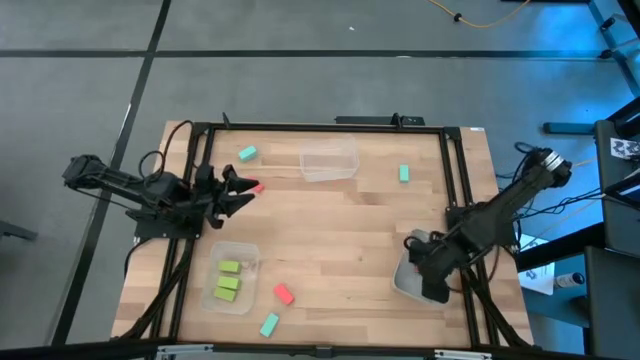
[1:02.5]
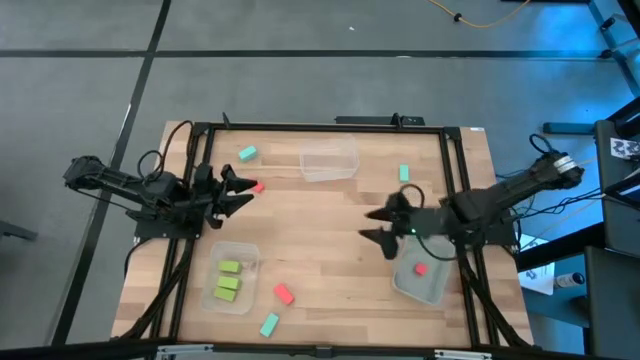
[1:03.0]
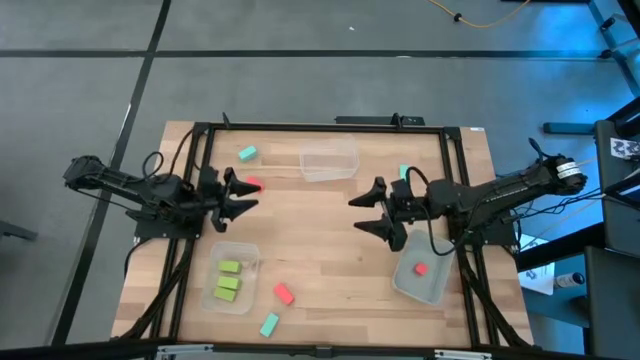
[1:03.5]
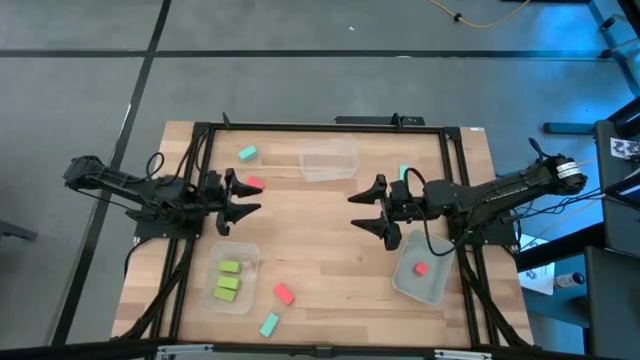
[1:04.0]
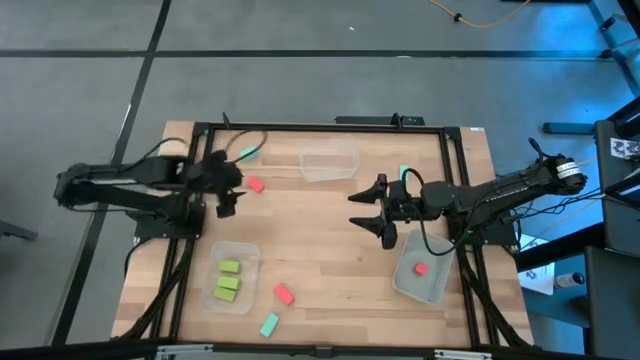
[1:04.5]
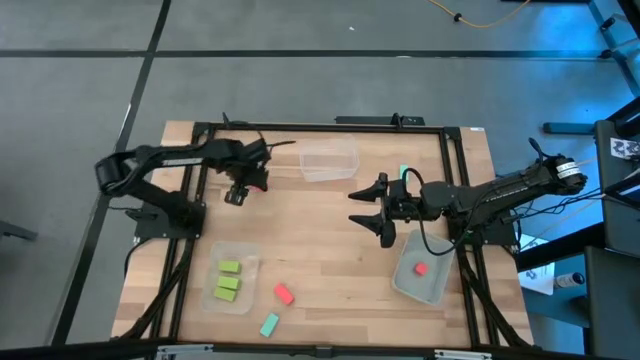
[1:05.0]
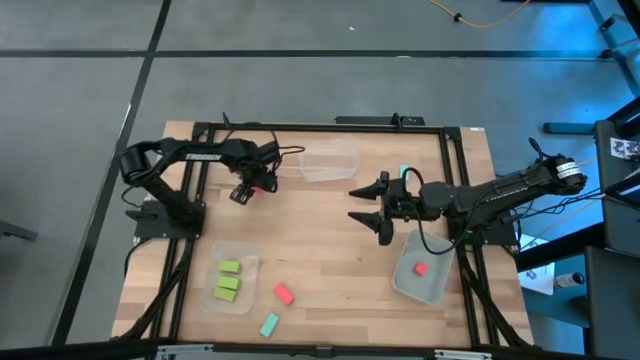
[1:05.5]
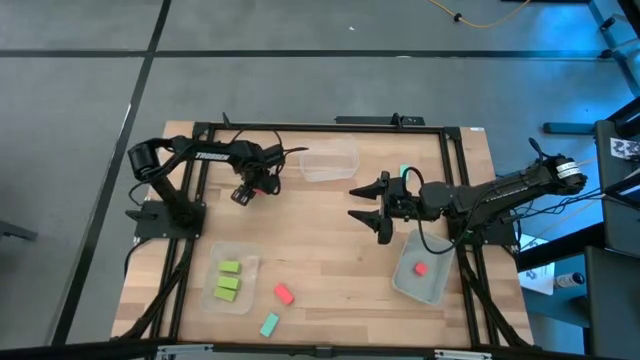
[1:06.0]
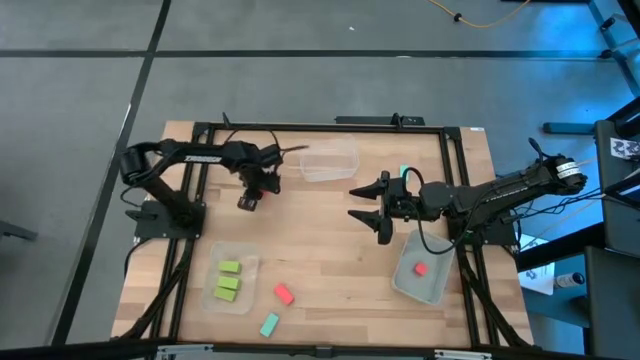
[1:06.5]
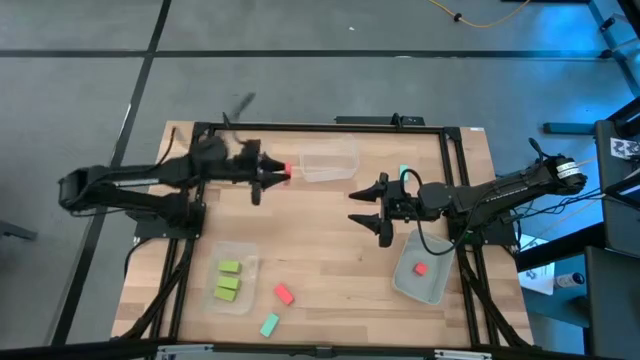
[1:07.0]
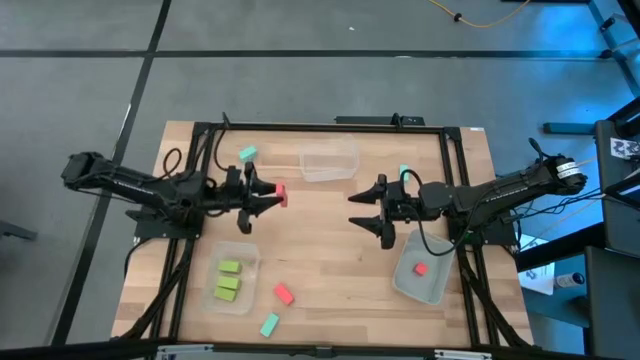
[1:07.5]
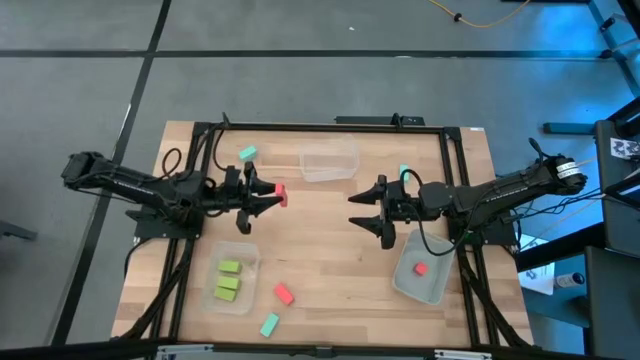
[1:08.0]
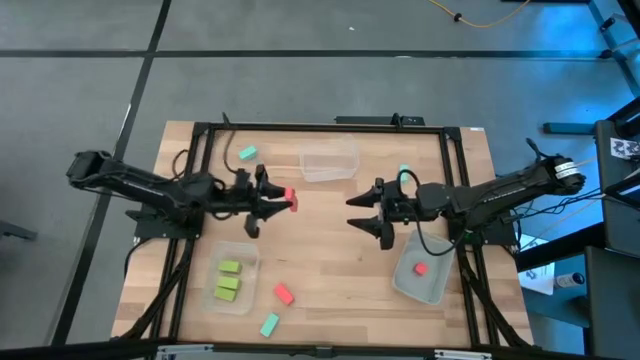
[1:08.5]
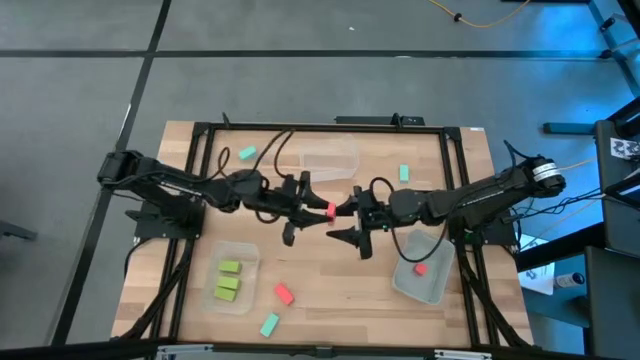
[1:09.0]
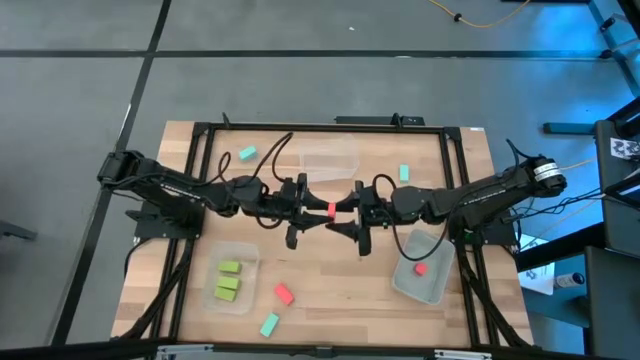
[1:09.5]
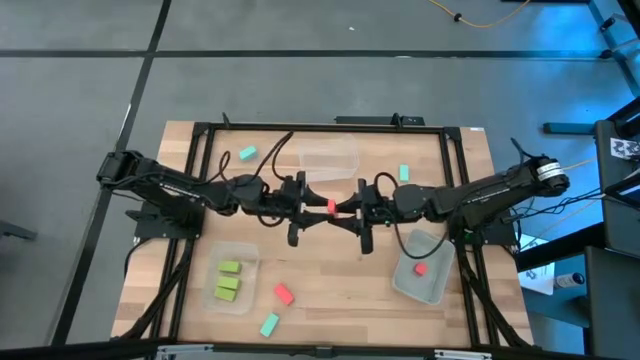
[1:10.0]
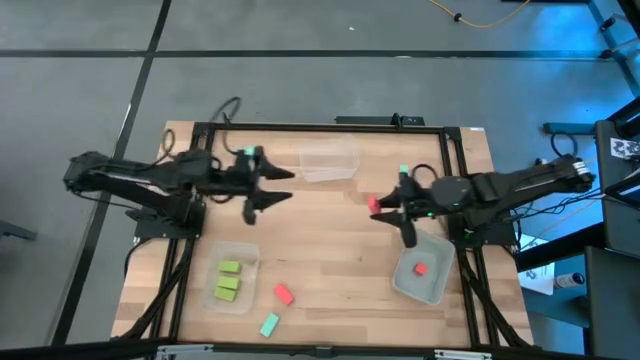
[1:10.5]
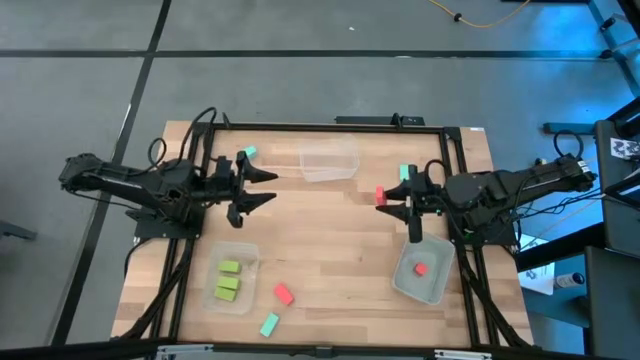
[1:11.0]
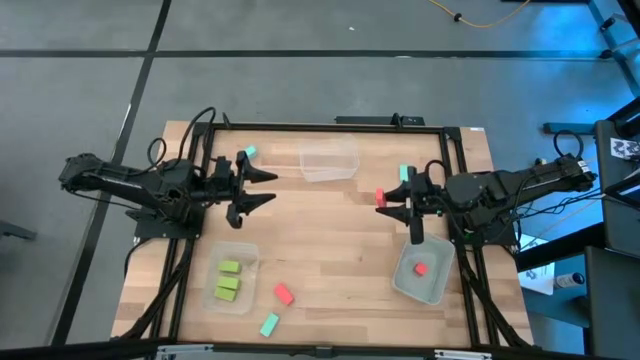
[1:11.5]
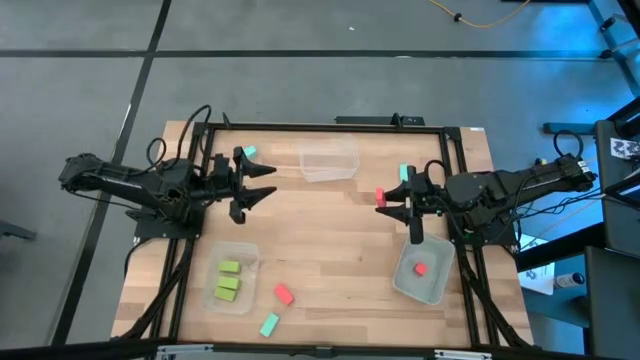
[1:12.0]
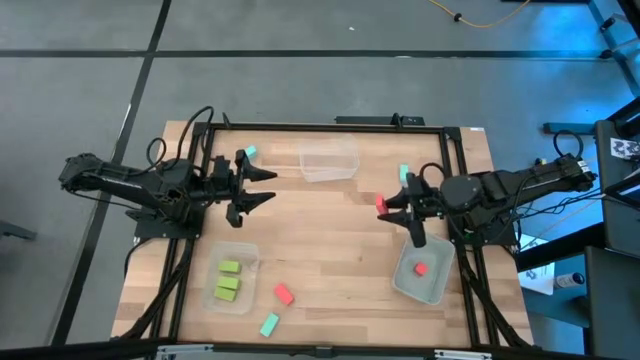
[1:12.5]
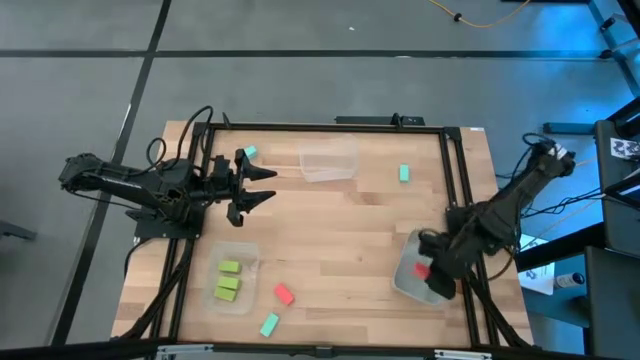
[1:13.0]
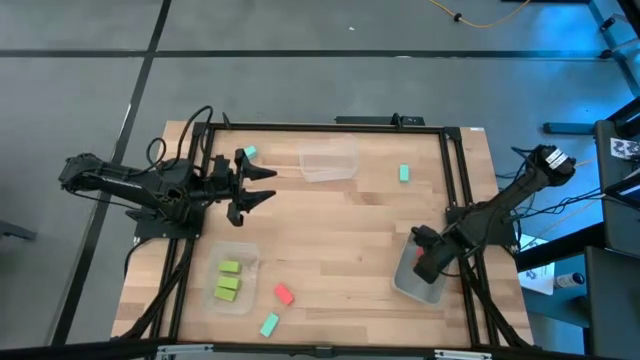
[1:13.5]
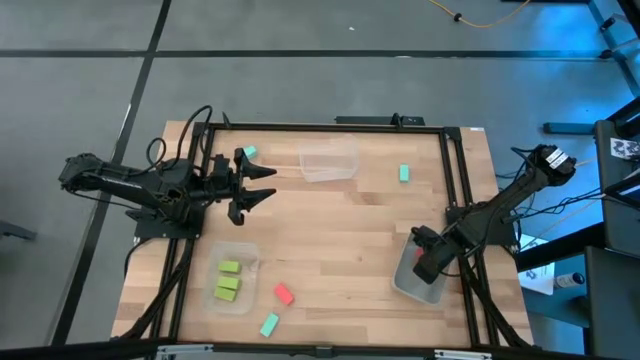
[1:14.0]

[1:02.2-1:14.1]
Task: Sort & place blocks by color
Put the top orange block into the gray bin

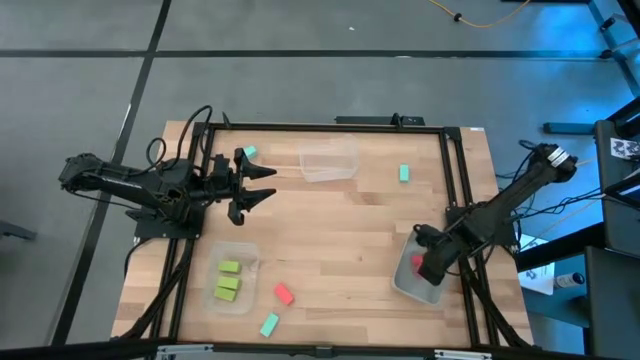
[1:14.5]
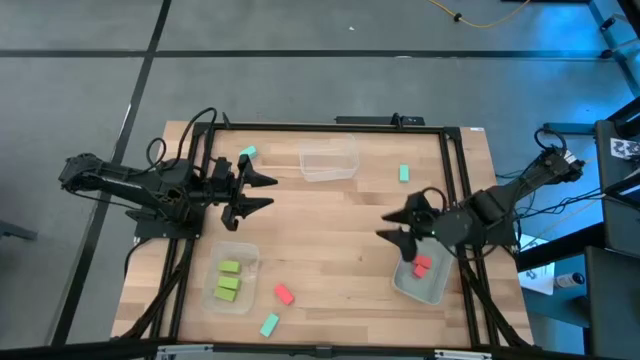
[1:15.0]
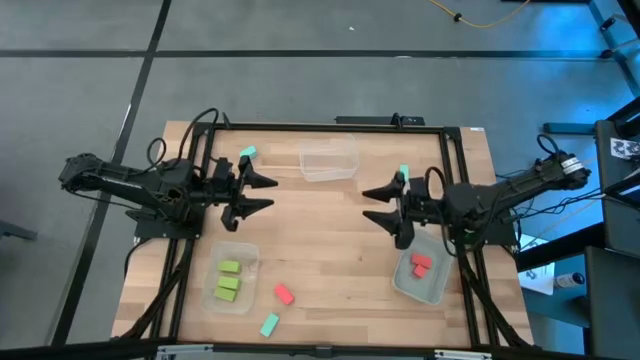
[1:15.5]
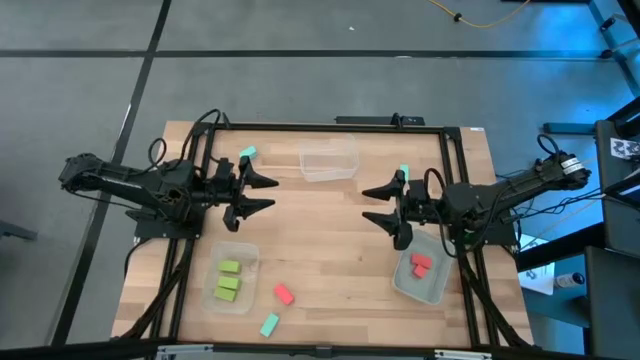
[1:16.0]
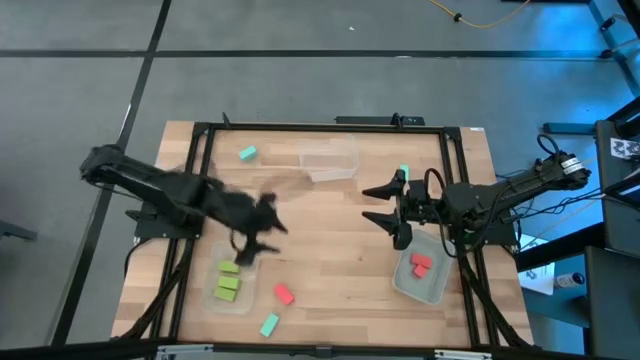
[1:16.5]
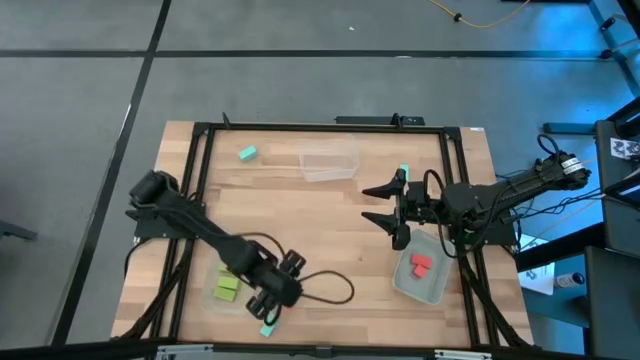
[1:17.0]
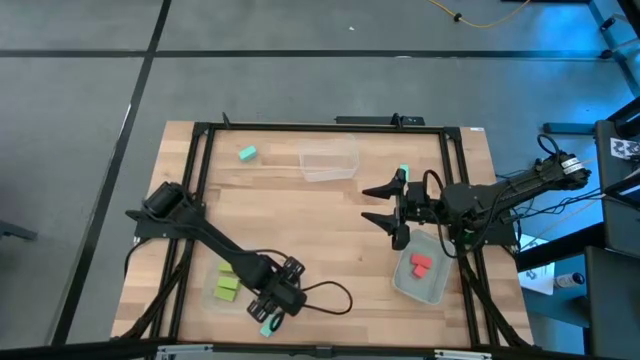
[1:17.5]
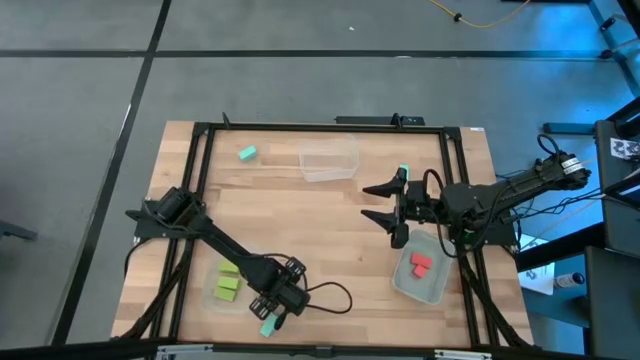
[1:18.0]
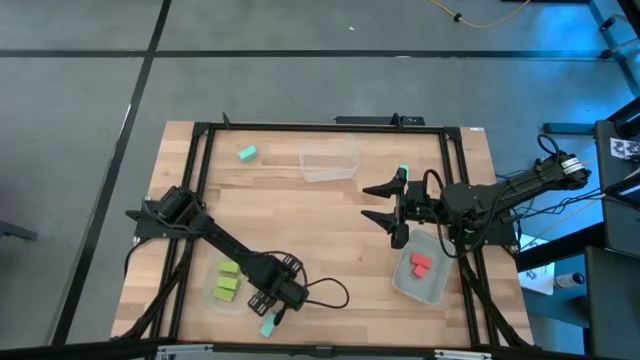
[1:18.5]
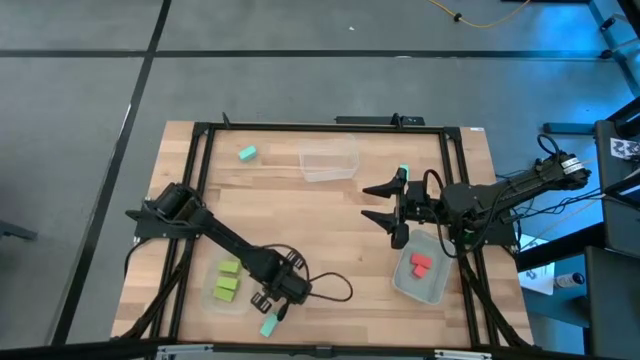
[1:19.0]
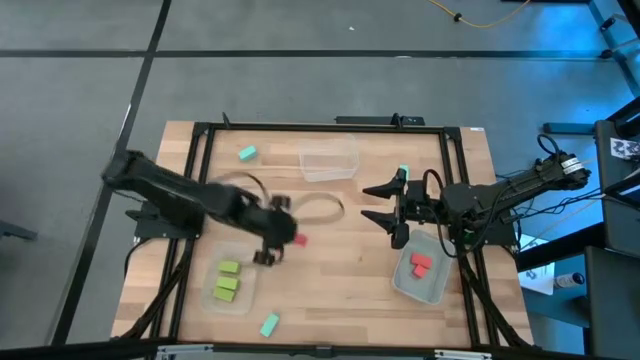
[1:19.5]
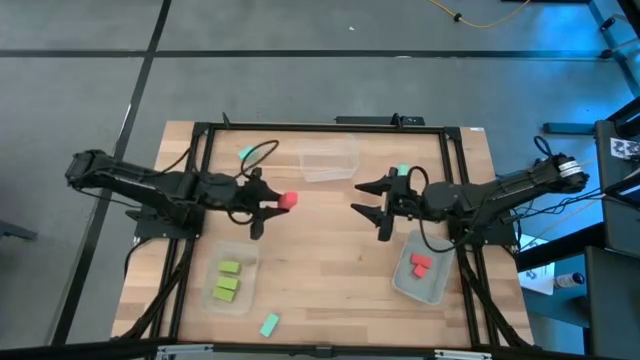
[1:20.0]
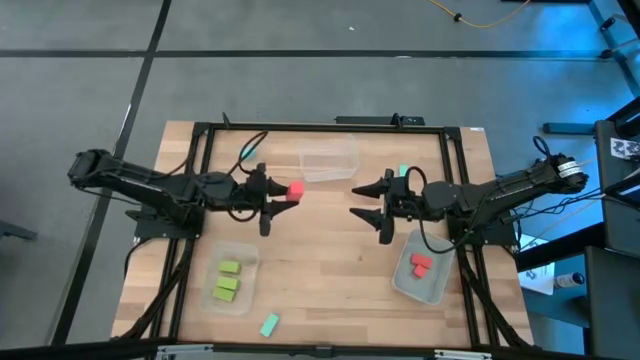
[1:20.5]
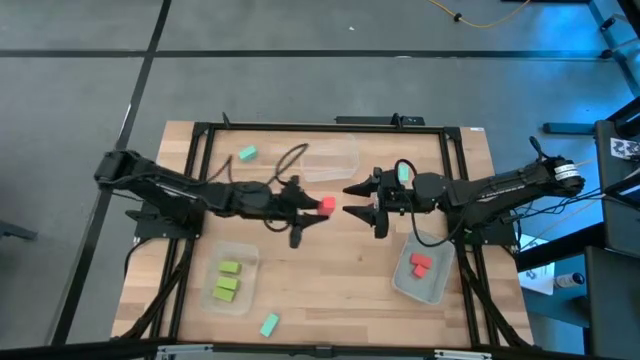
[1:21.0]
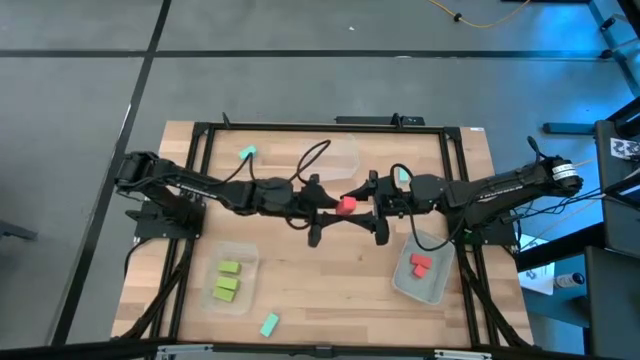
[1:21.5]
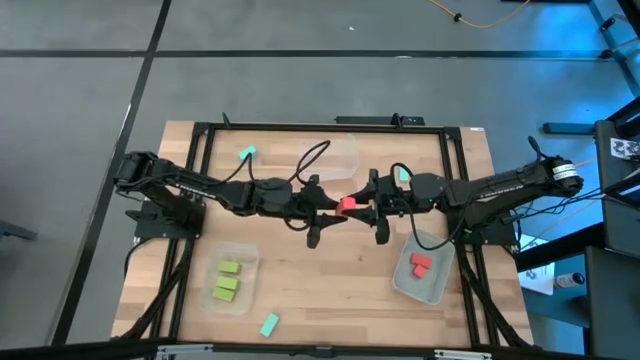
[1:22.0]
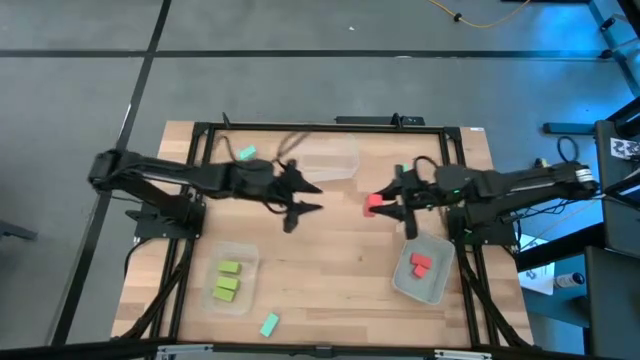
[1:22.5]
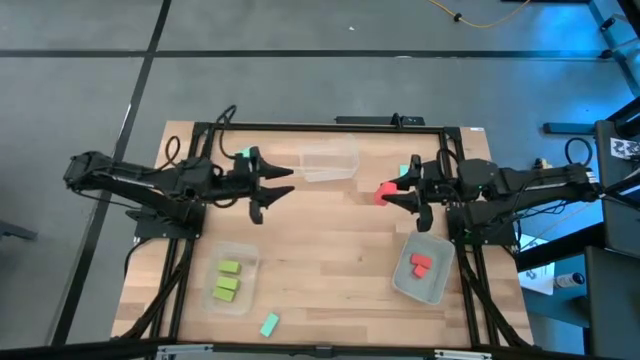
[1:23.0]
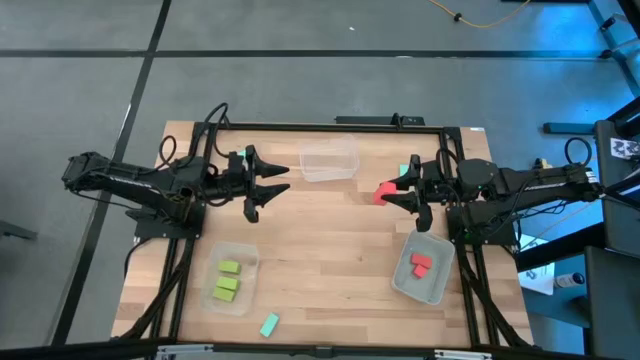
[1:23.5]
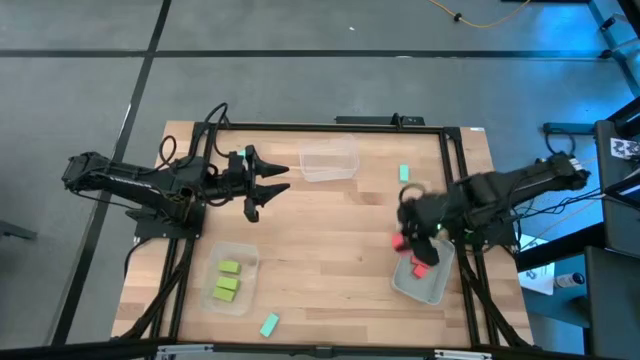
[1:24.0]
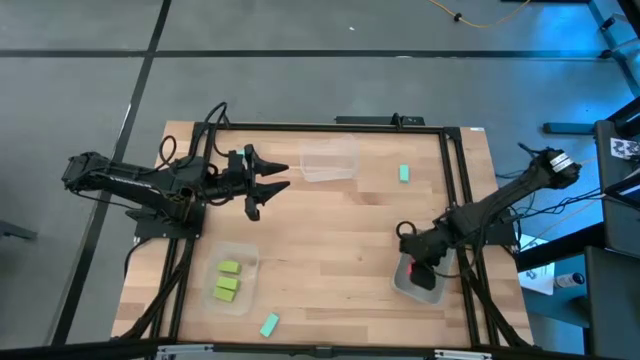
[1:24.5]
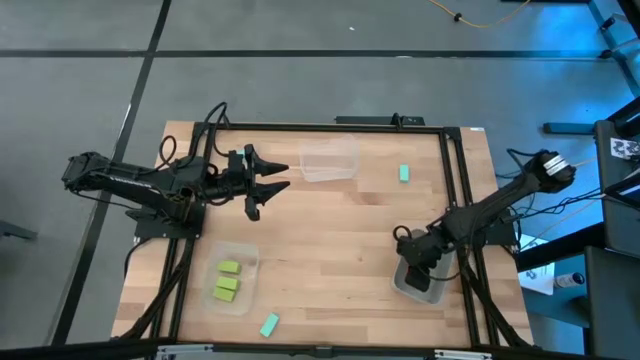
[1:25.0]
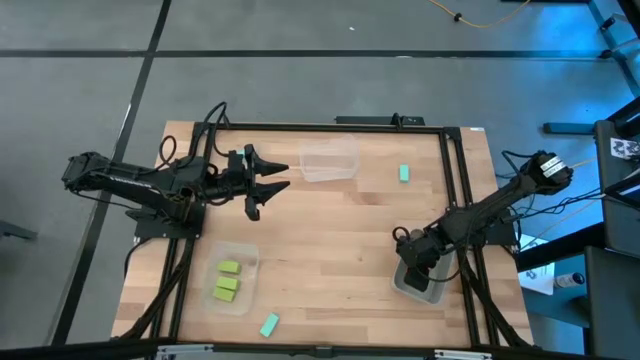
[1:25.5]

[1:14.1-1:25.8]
Put the orange block into the gray bin
